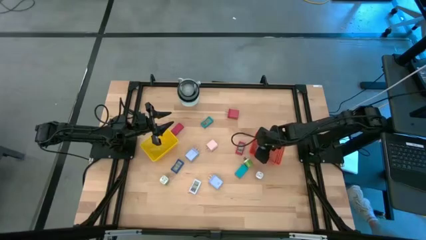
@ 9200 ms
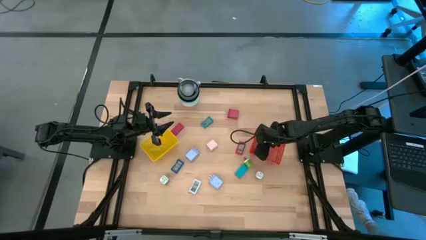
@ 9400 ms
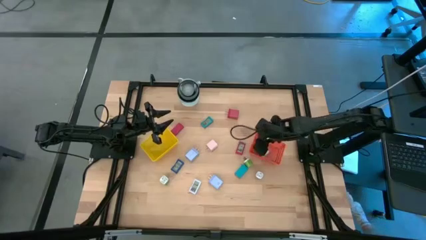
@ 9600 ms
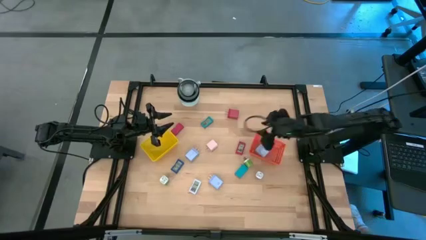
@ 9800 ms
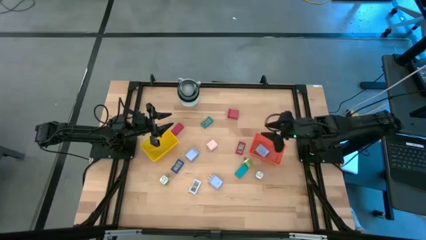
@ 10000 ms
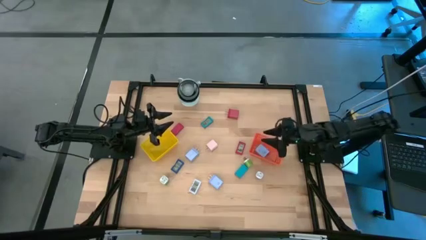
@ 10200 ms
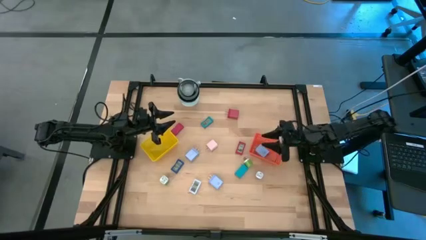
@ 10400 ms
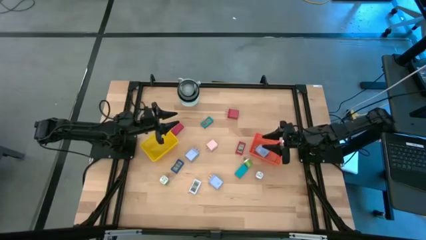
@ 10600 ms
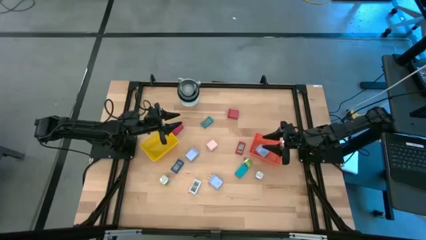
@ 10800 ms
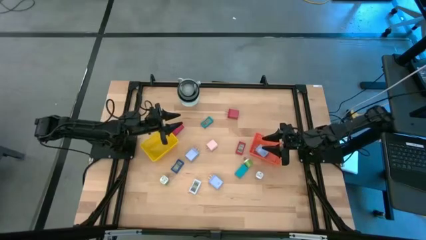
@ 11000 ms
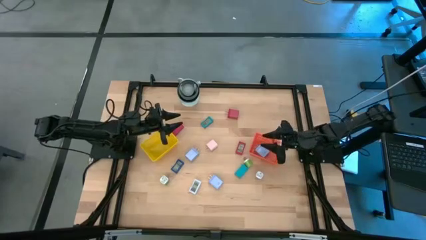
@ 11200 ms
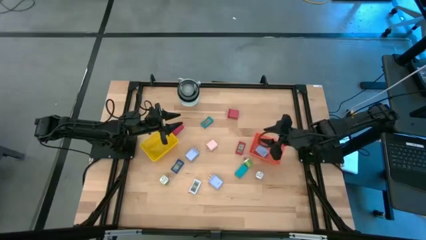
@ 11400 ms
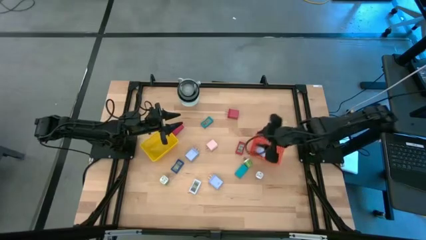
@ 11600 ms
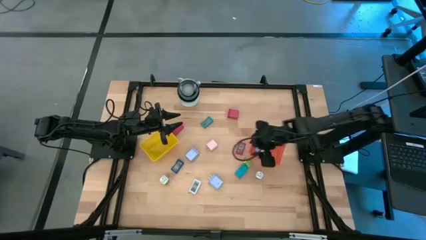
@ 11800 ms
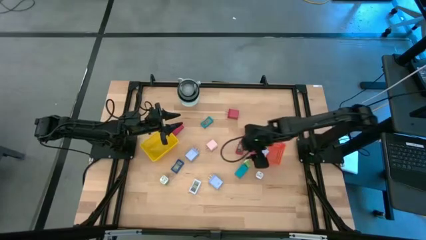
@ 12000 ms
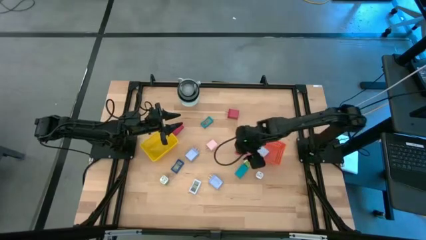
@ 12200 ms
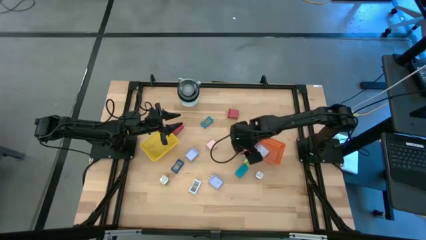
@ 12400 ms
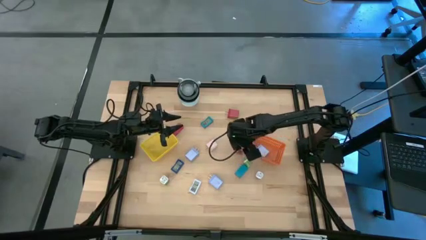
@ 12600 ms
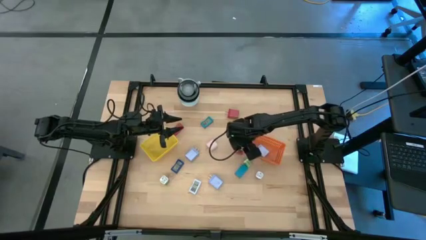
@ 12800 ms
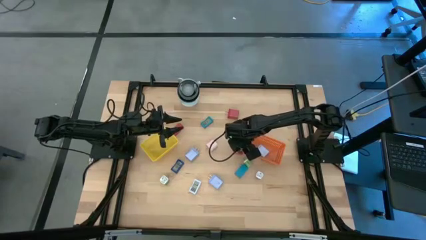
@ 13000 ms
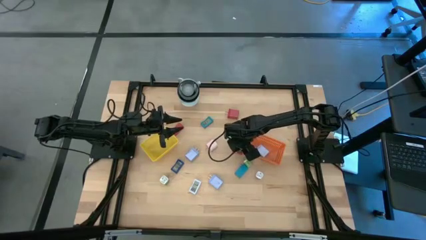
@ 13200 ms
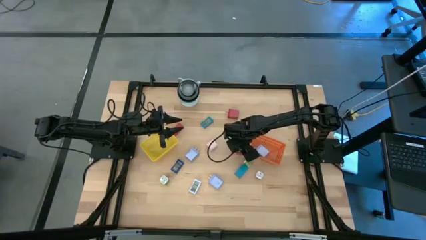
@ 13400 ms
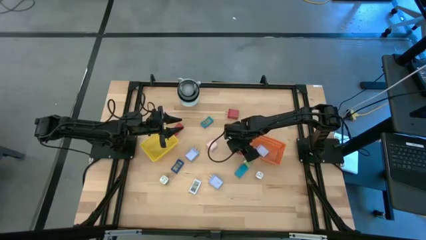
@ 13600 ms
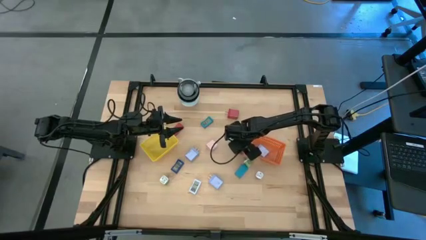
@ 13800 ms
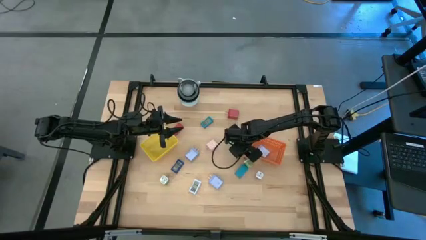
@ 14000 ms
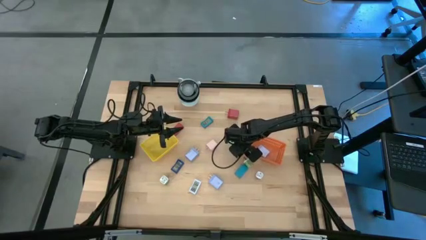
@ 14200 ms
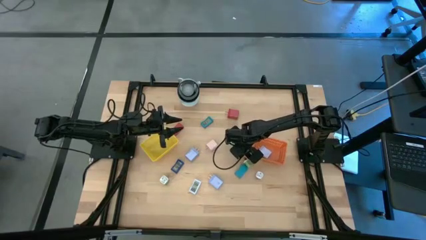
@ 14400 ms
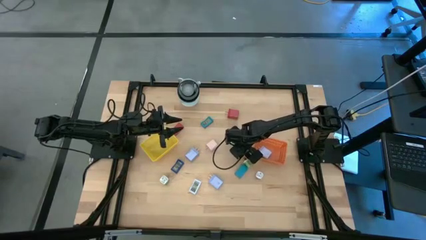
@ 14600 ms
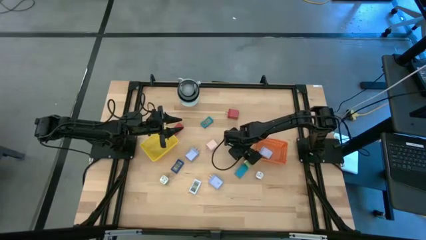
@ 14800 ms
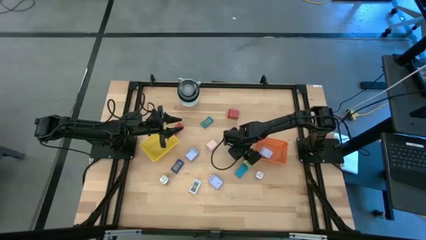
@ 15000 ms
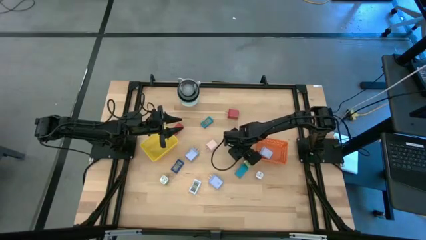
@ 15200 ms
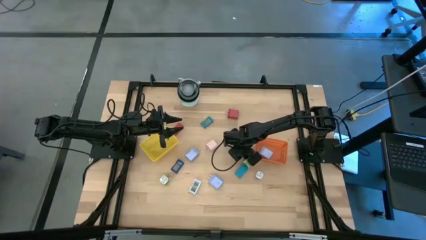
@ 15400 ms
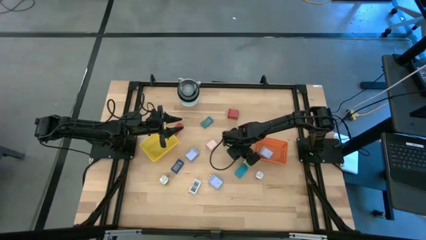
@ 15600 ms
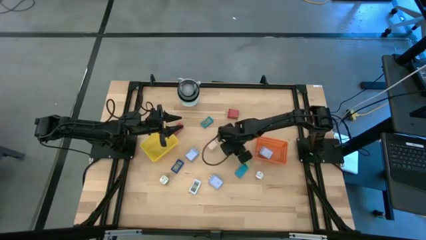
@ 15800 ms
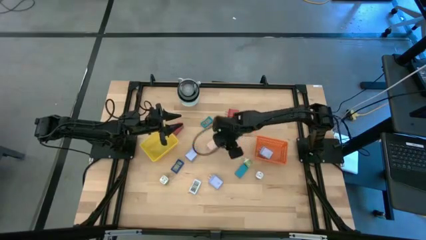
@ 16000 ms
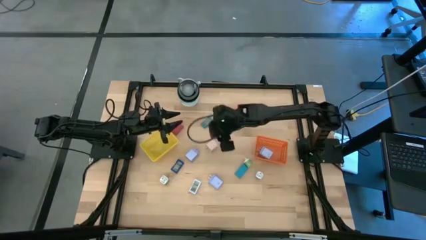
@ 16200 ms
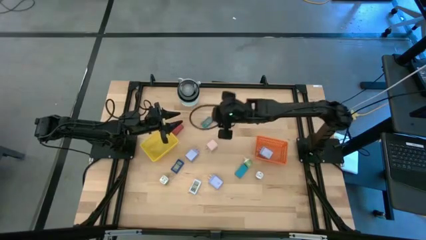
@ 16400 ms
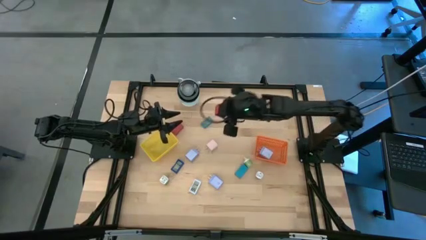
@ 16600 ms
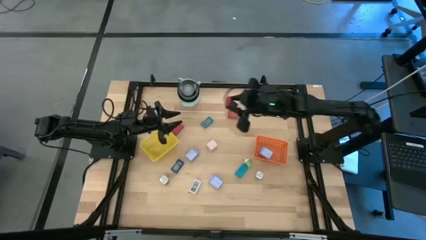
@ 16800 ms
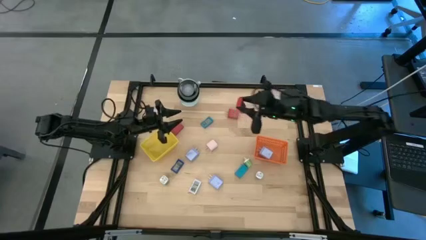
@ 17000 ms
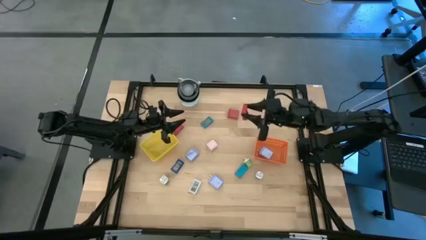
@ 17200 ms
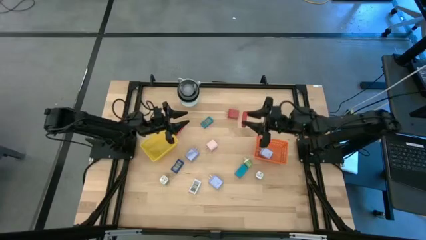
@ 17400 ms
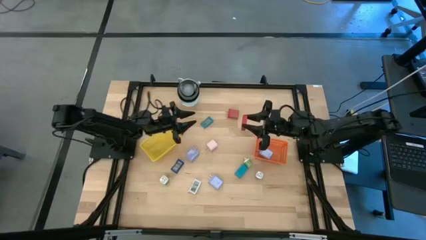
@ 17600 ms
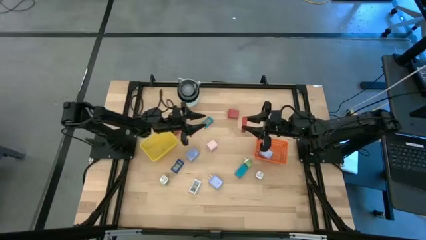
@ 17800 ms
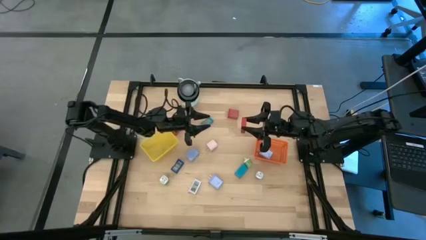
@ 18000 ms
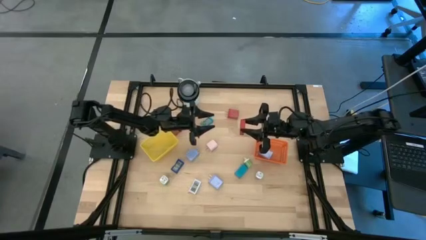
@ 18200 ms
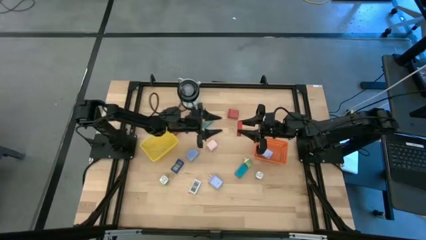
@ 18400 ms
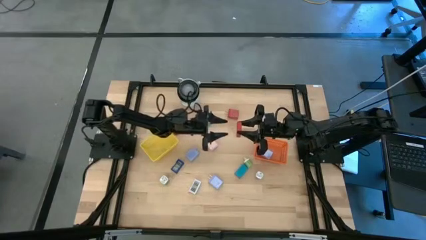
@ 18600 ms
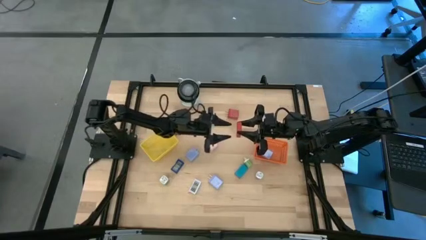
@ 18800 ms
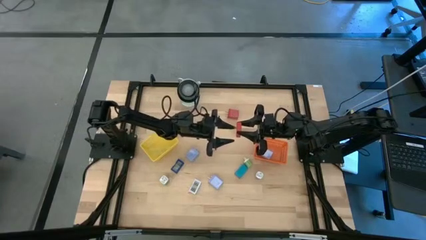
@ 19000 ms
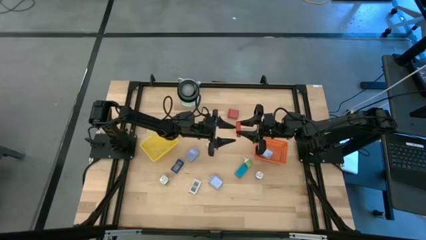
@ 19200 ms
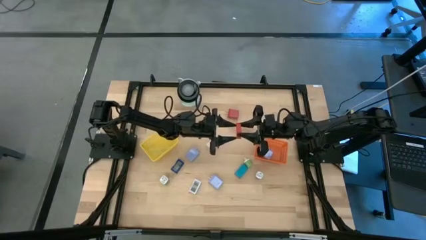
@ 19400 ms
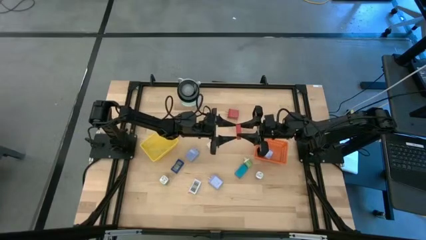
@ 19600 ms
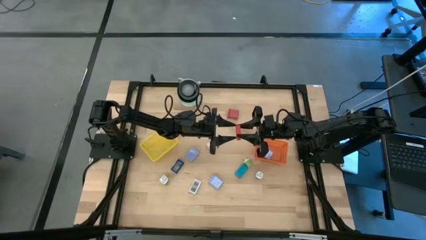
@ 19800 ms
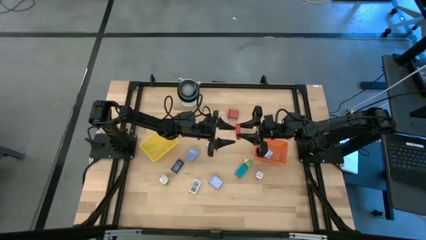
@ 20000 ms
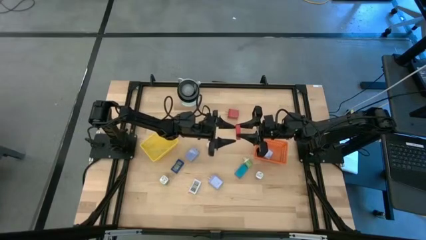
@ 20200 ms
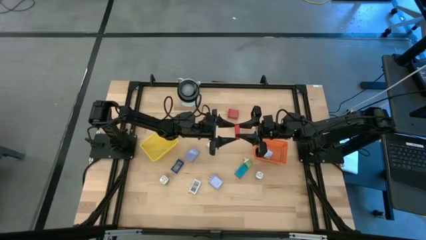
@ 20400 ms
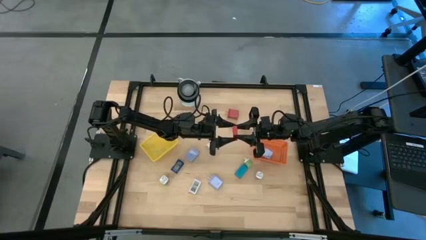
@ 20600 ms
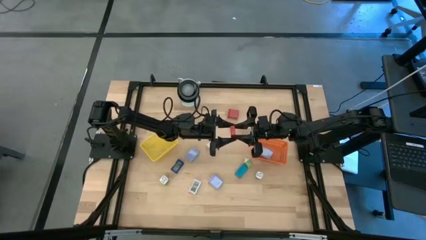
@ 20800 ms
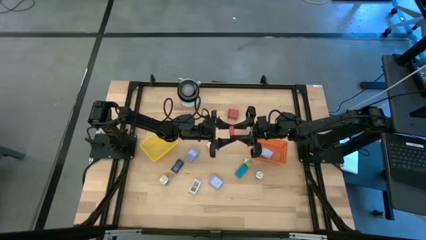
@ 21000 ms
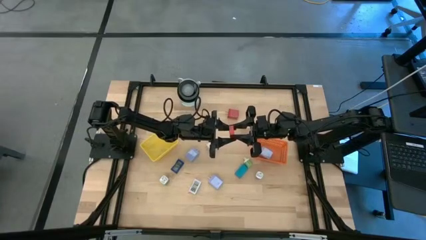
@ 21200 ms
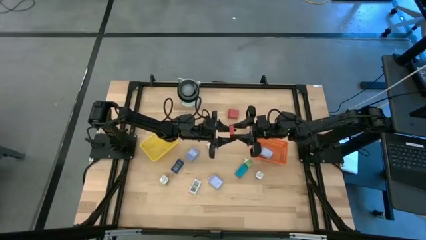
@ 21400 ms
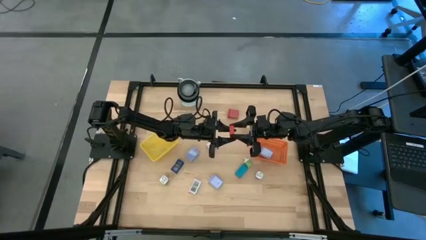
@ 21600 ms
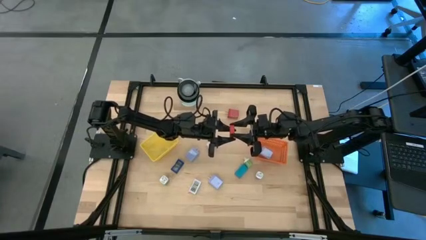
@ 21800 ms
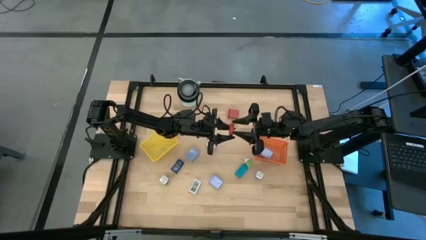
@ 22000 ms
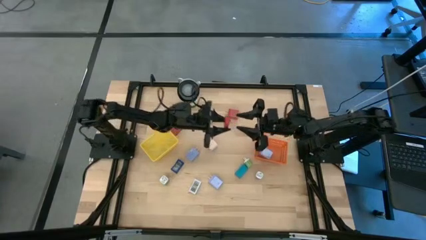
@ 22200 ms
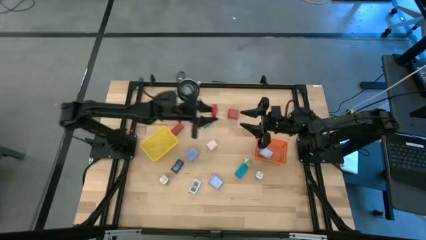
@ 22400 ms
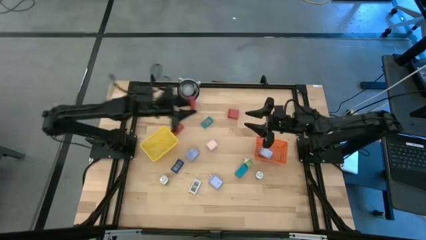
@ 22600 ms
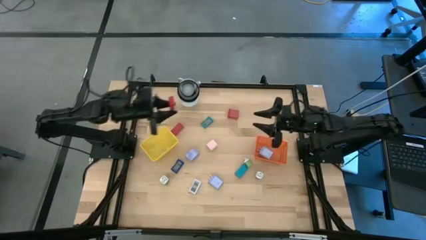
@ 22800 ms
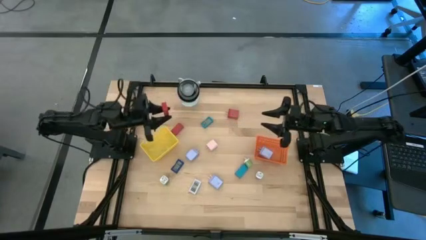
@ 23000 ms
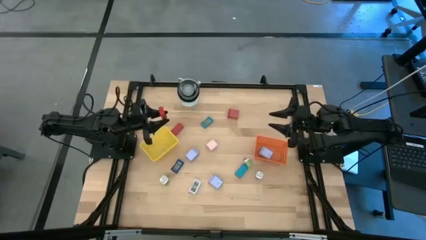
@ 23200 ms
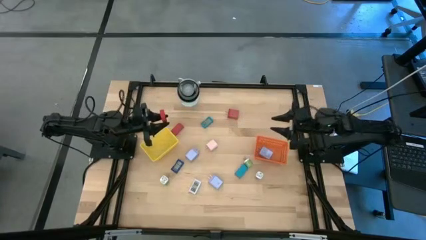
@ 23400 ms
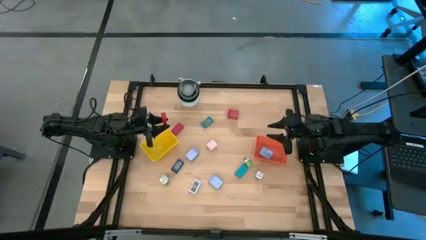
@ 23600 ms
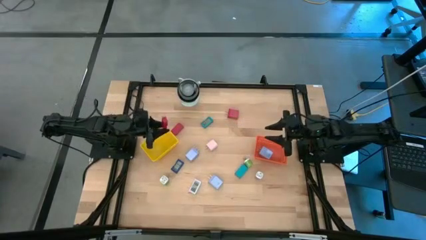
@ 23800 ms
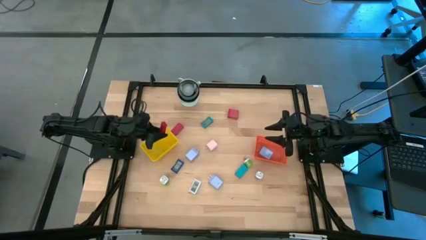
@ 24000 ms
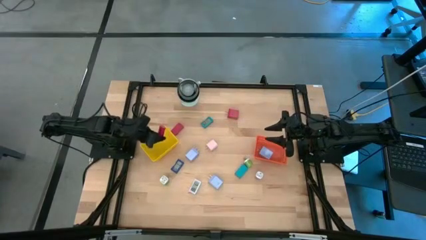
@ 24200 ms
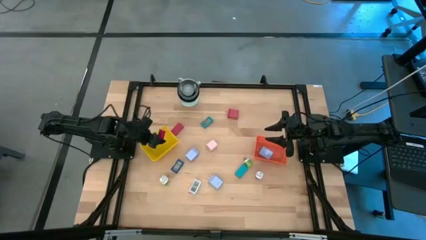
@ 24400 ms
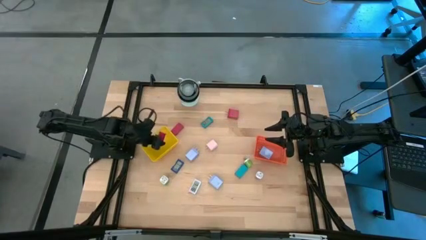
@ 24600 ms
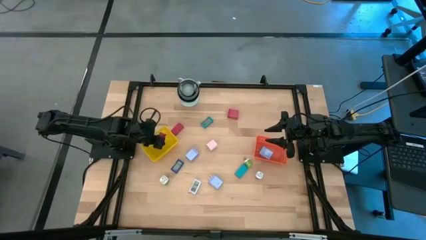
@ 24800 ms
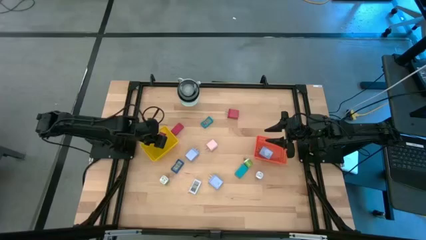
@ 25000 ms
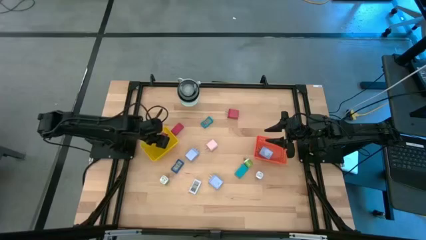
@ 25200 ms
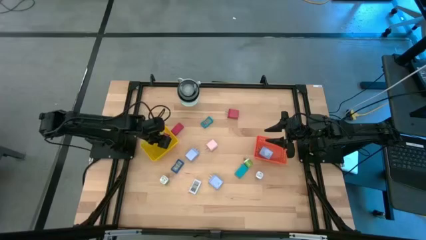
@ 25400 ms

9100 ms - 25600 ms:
Task: Pick & Place Office items
Put the right red digital timer into the yellow basket
